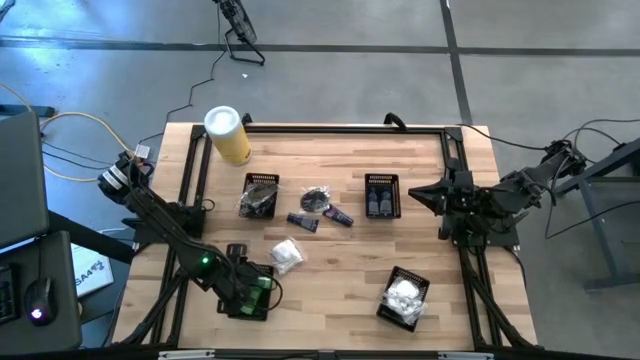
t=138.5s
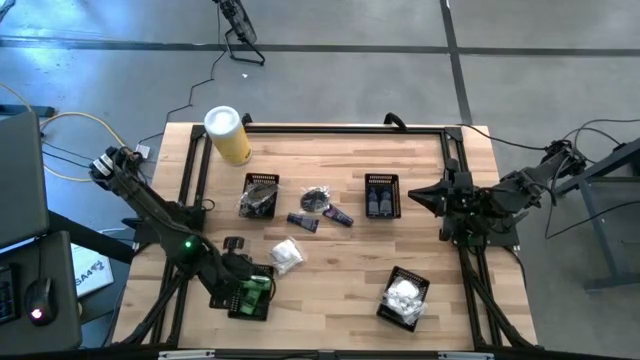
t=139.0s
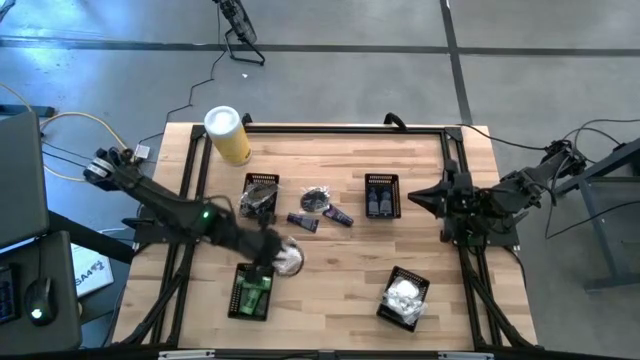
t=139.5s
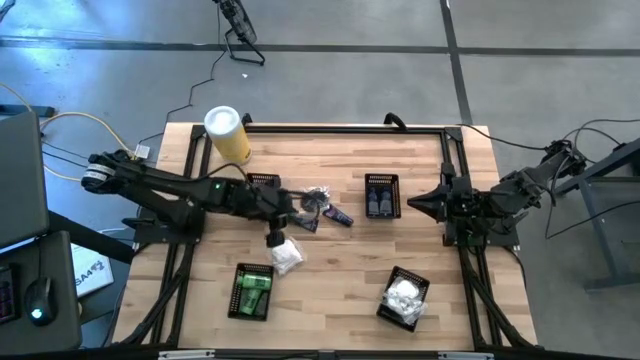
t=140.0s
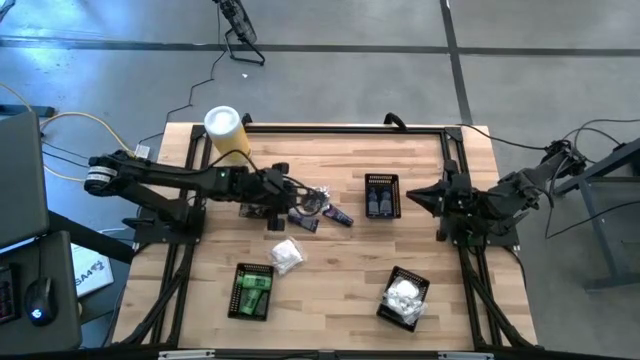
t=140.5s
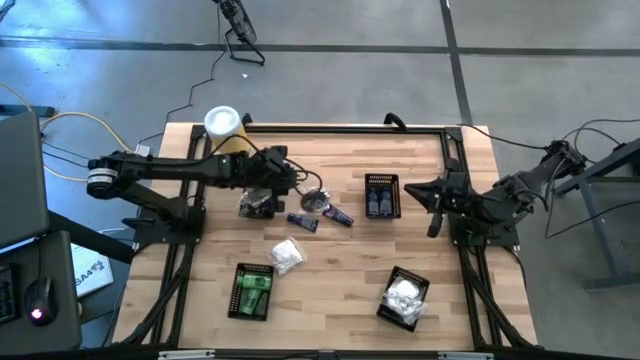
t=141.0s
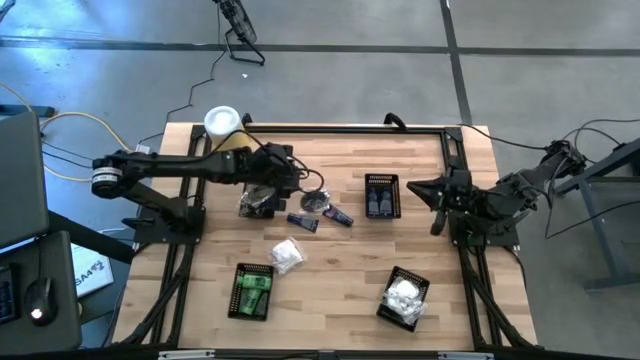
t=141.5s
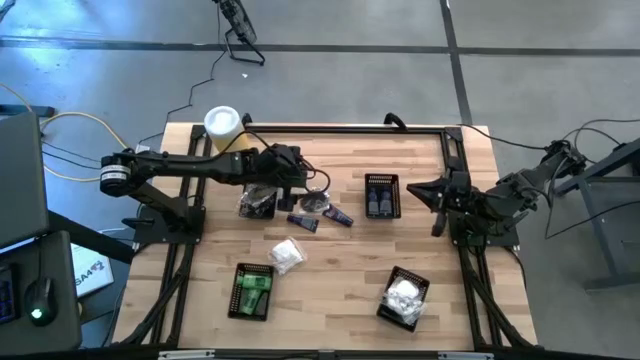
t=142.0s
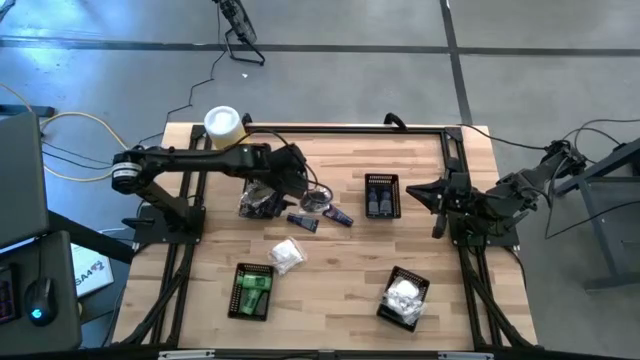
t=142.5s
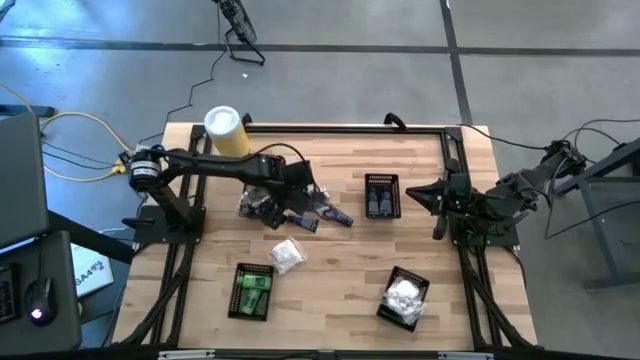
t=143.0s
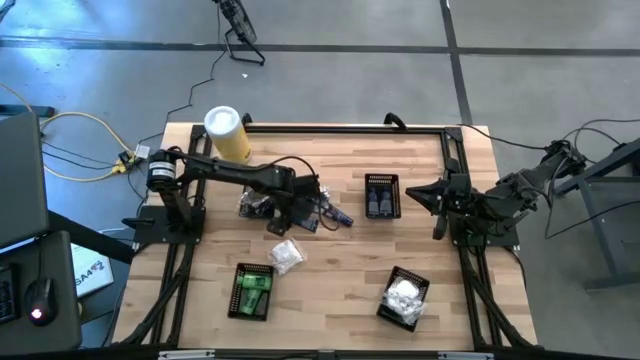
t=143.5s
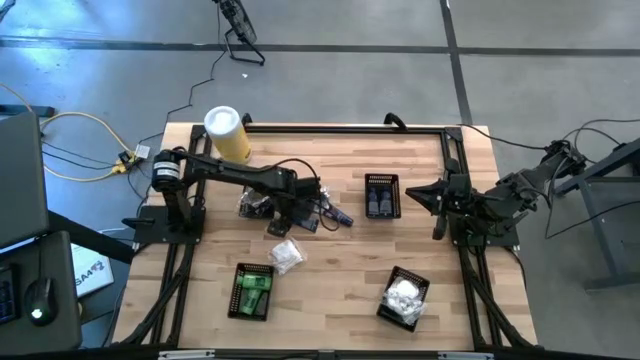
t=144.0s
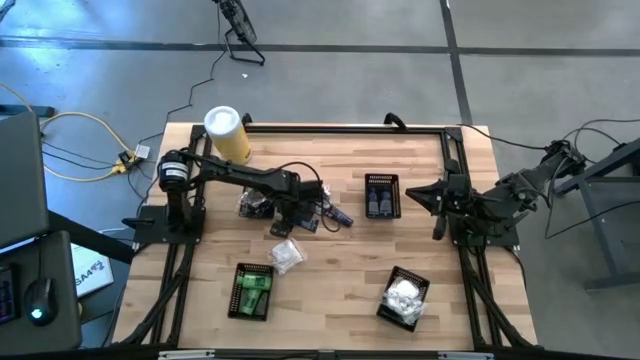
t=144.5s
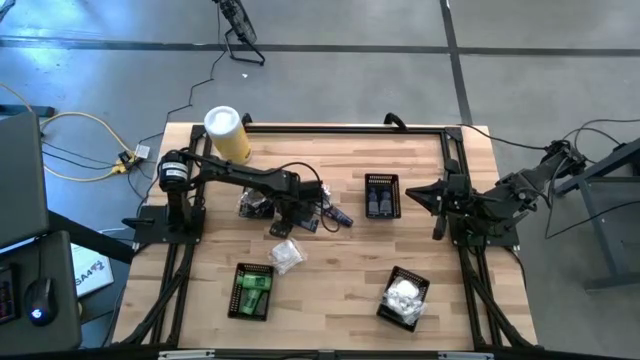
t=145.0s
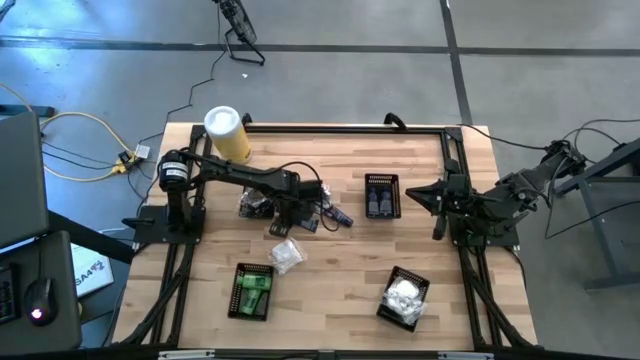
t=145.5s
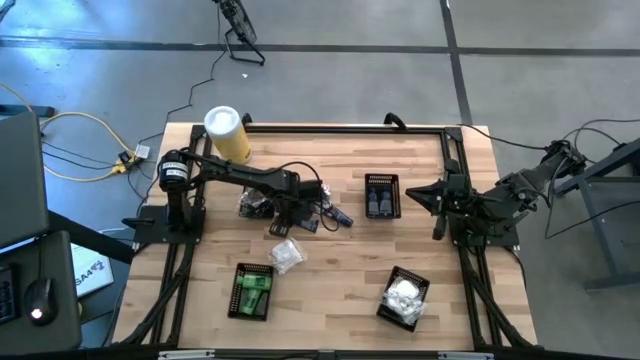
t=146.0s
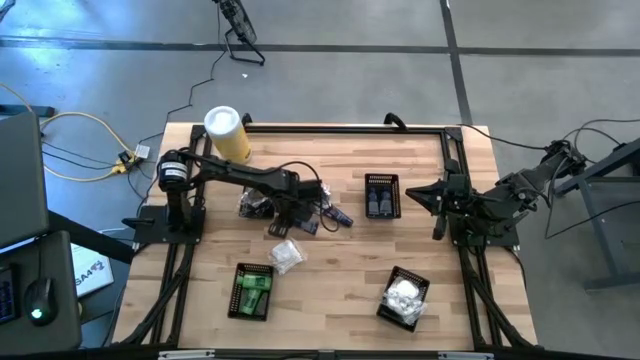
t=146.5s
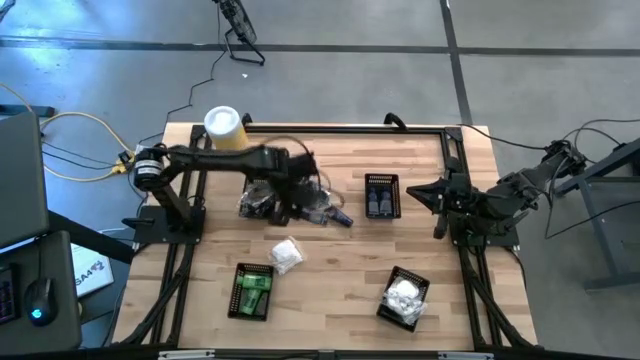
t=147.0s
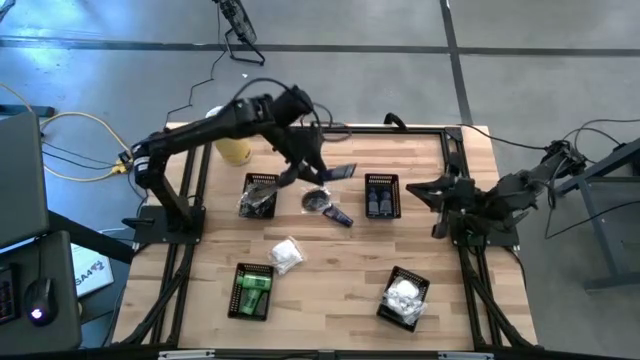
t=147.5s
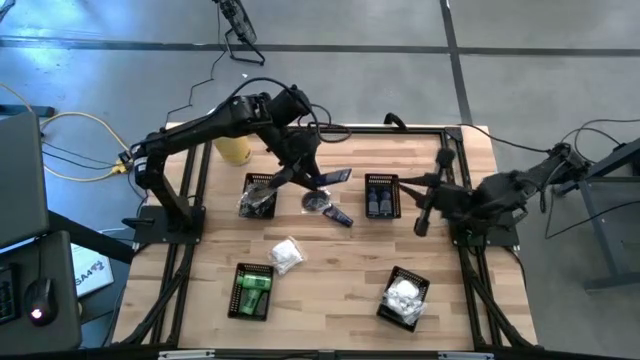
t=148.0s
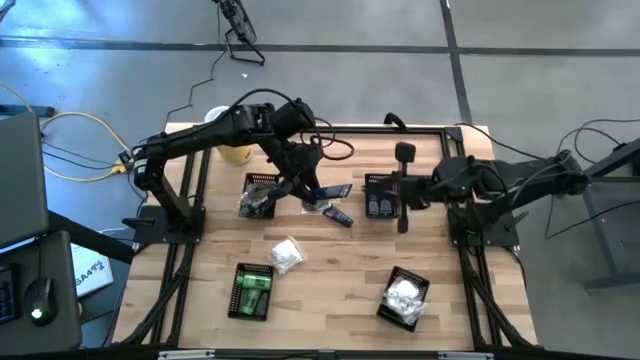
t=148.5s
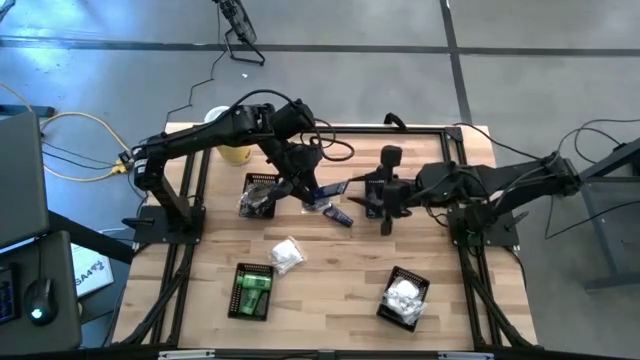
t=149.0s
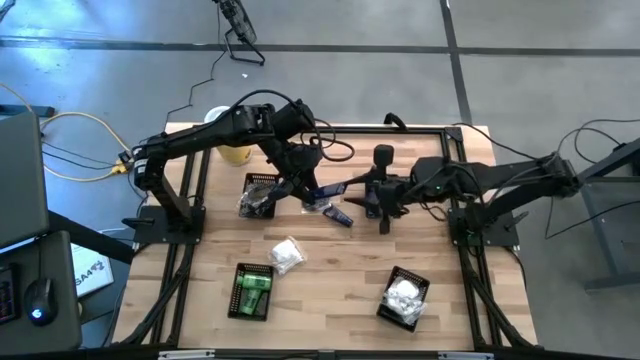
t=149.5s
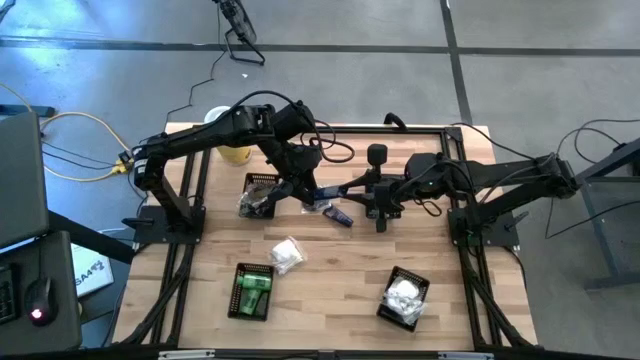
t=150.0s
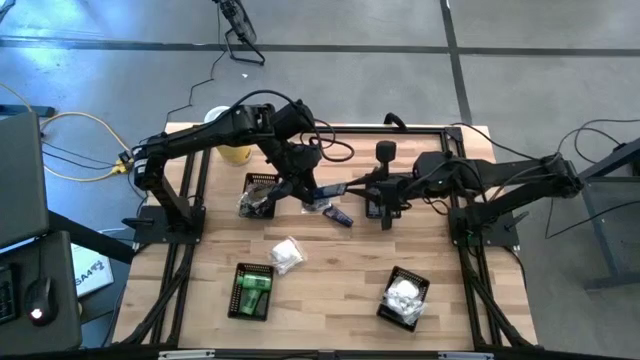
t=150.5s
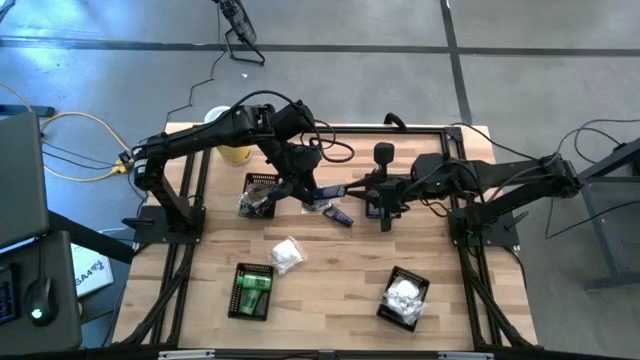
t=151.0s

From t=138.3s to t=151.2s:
Task: Pick & Place Travel size toiletries
Put the blue shave cream into the top right black basket

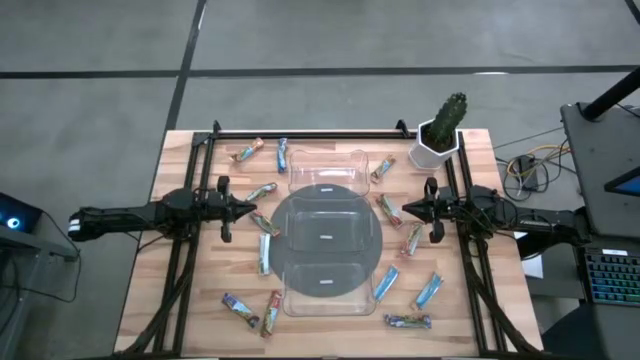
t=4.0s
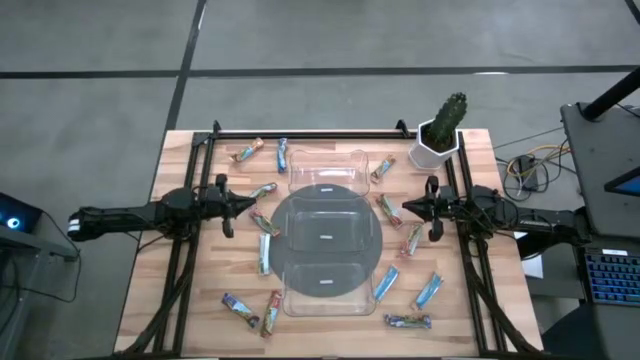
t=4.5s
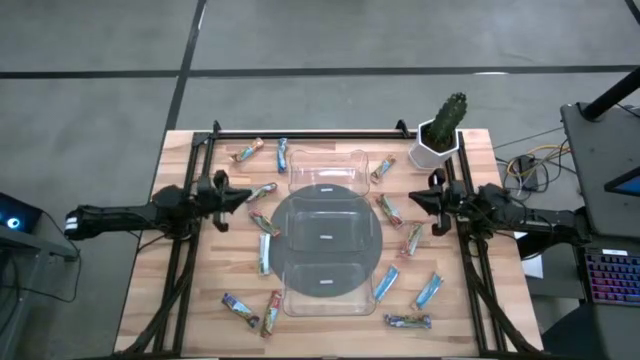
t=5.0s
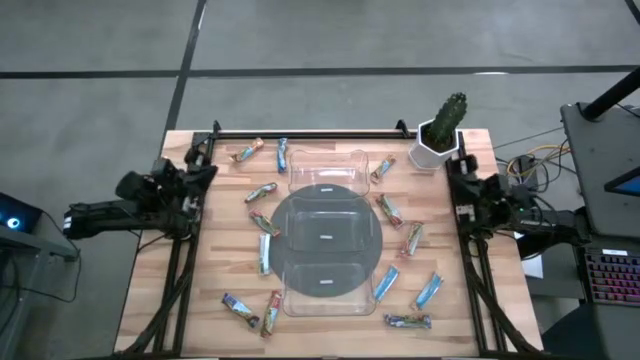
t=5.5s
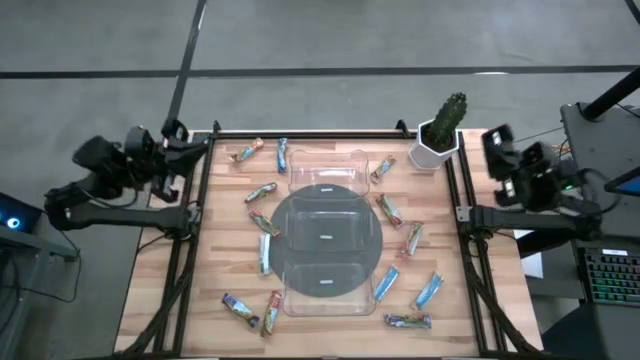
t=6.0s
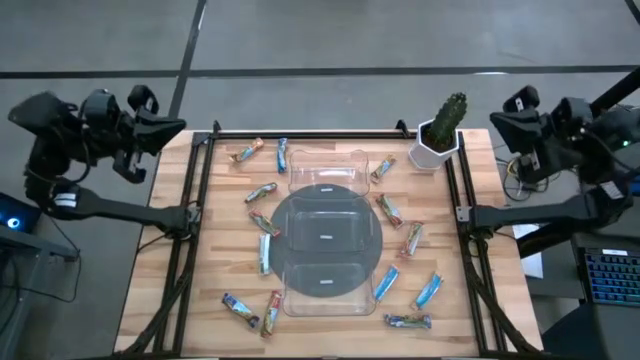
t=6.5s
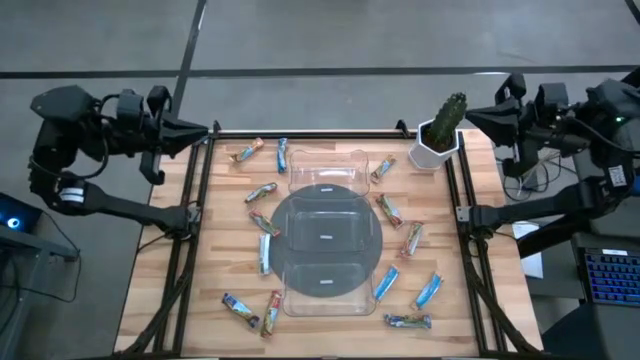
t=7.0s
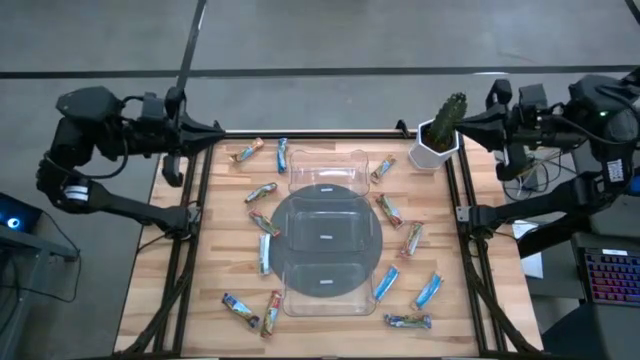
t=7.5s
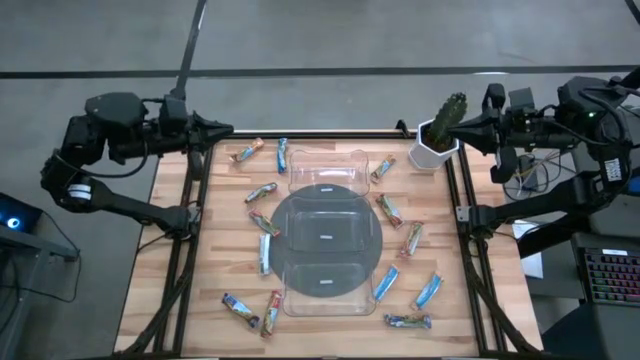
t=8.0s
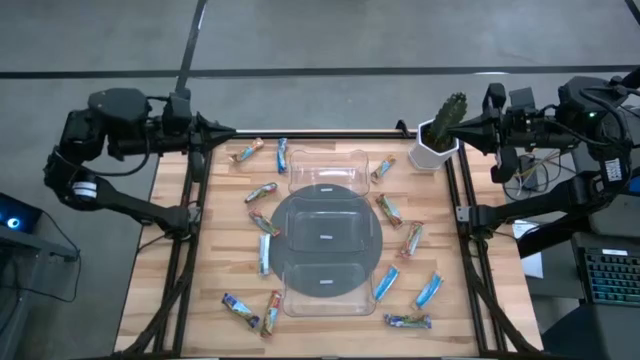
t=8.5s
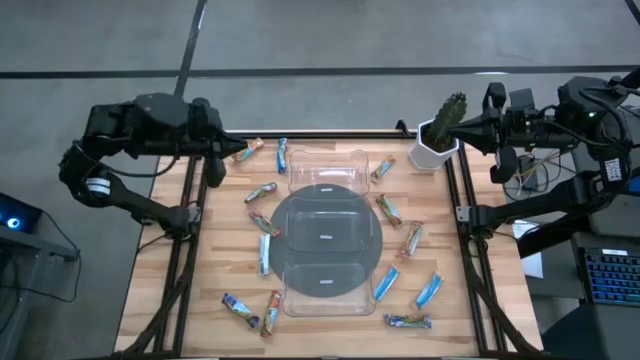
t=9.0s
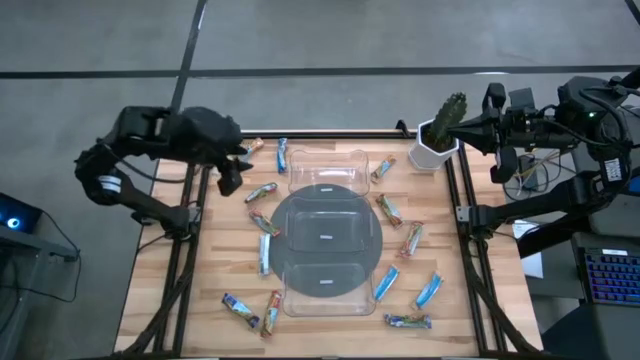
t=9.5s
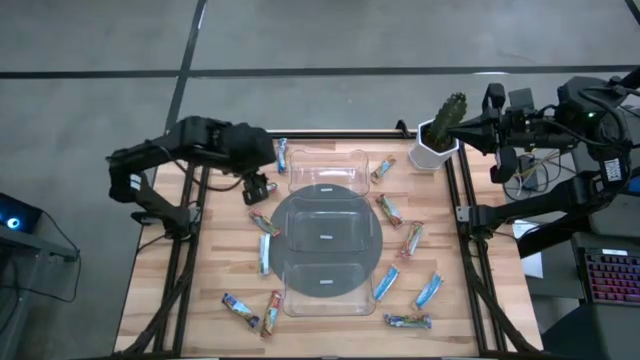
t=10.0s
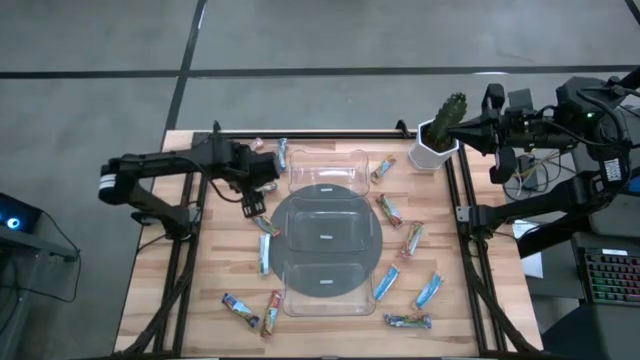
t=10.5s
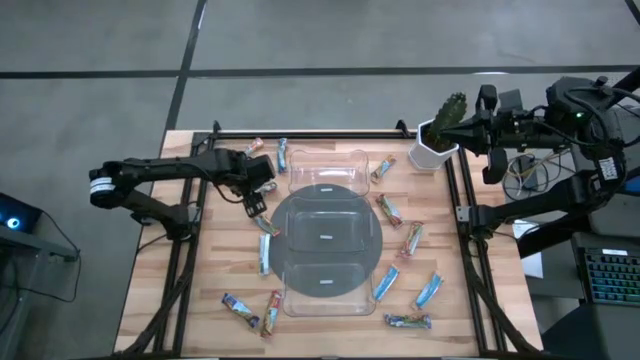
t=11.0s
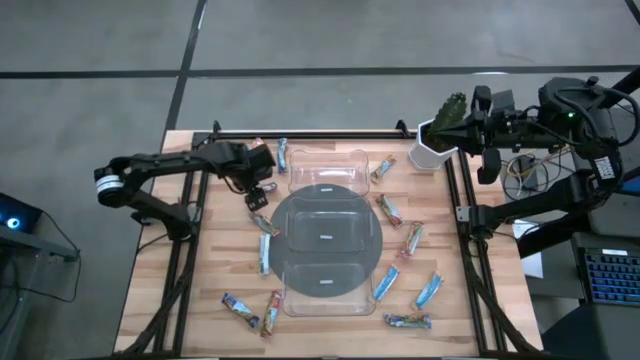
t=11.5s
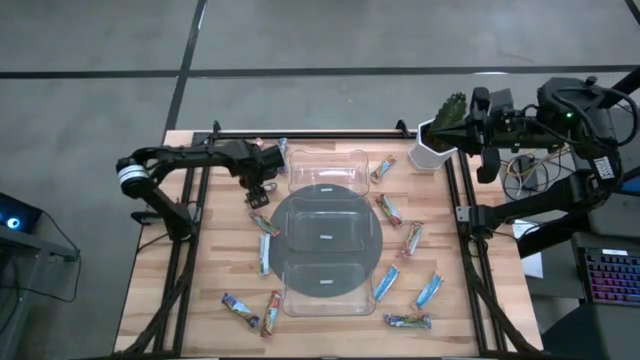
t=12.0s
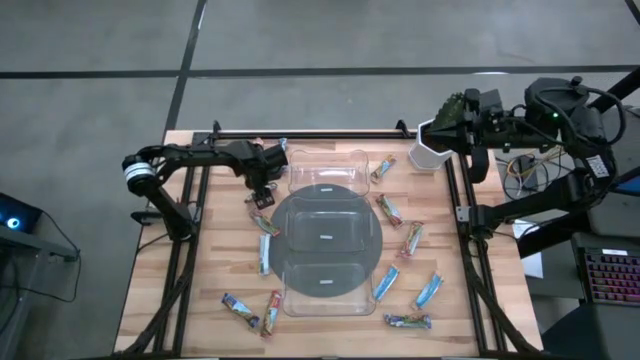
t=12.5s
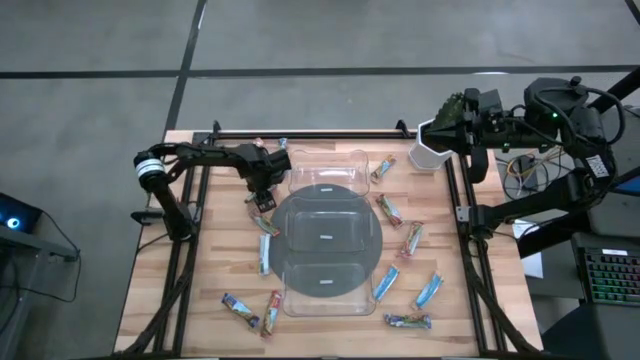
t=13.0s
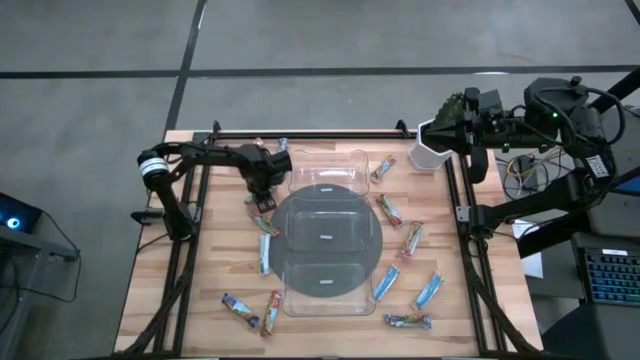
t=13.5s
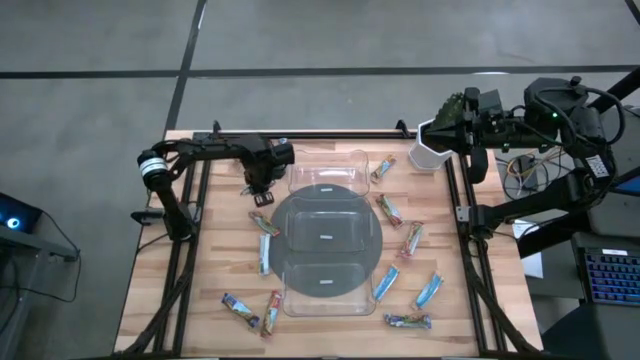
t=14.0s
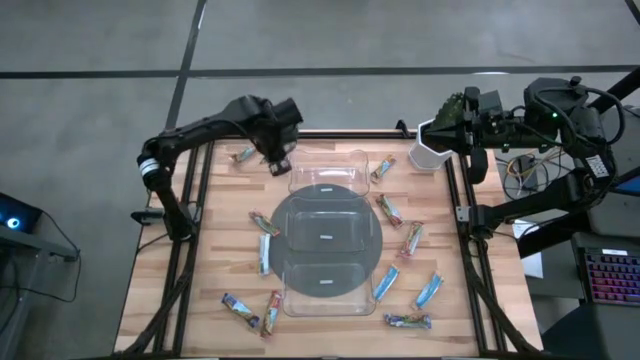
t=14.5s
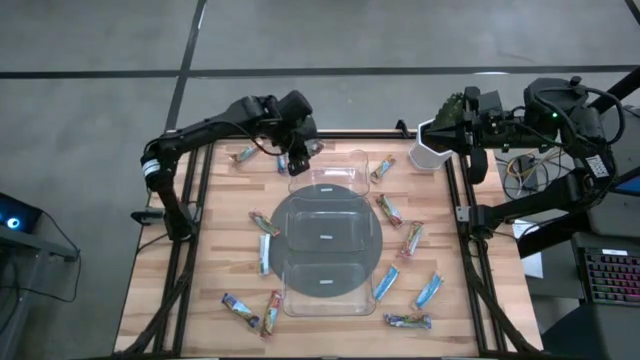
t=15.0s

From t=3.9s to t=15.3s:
Task: Pick and place Granola Bars by type
Put the red granola bar into the top transparent bin
